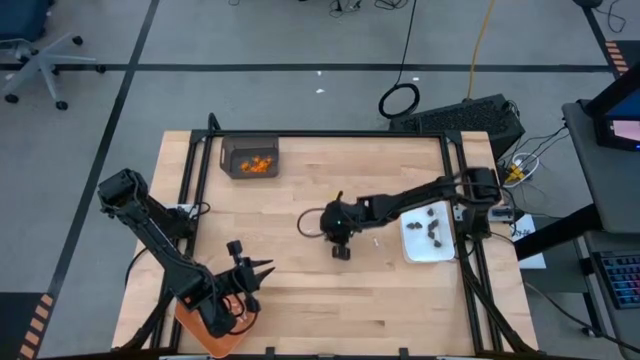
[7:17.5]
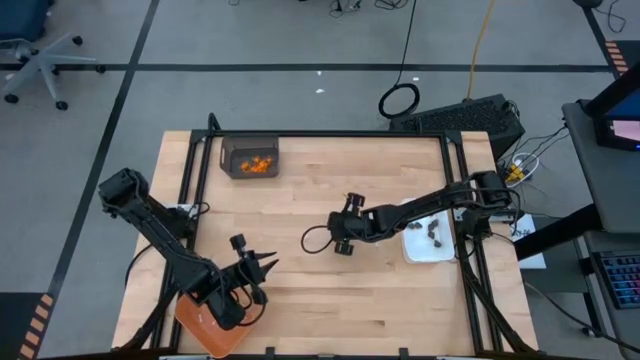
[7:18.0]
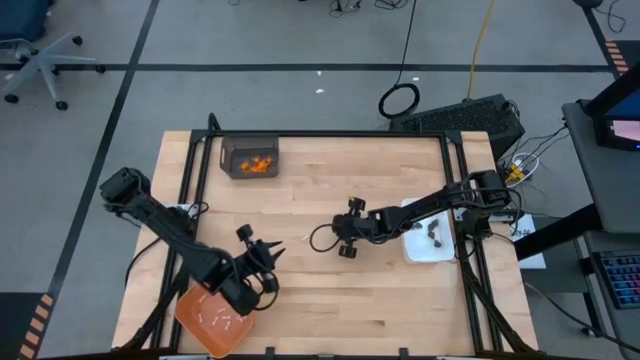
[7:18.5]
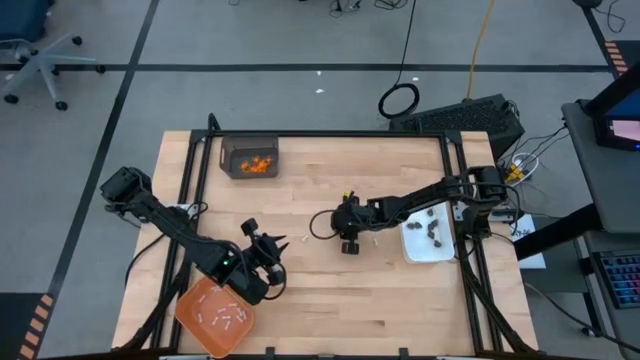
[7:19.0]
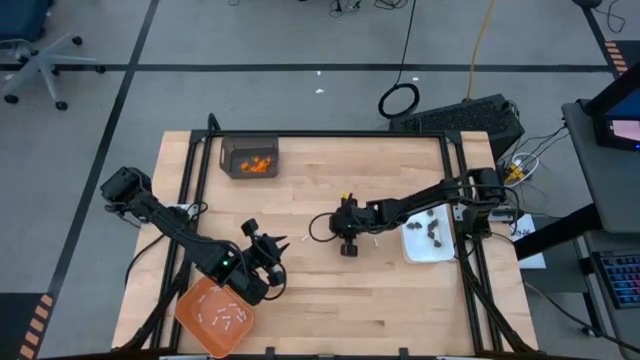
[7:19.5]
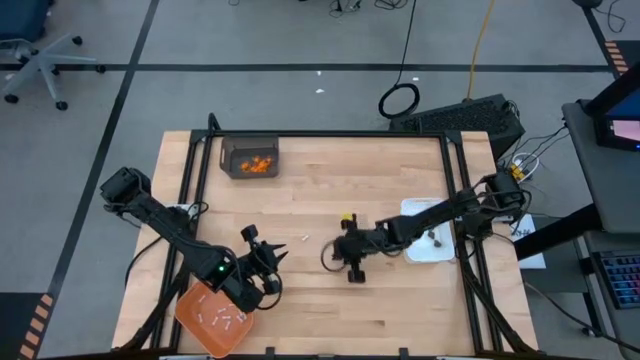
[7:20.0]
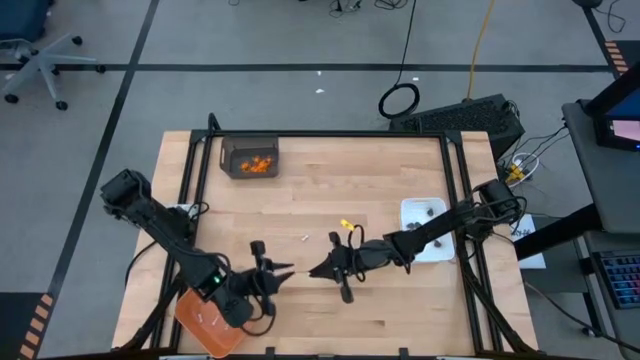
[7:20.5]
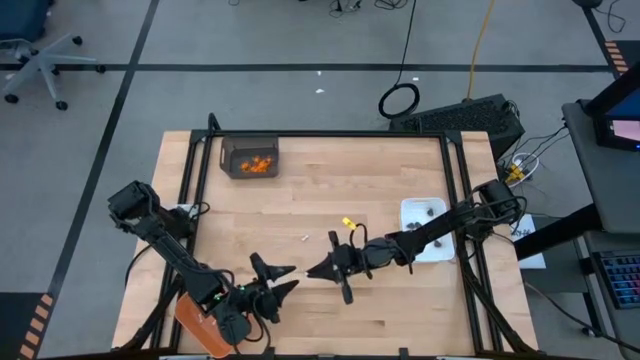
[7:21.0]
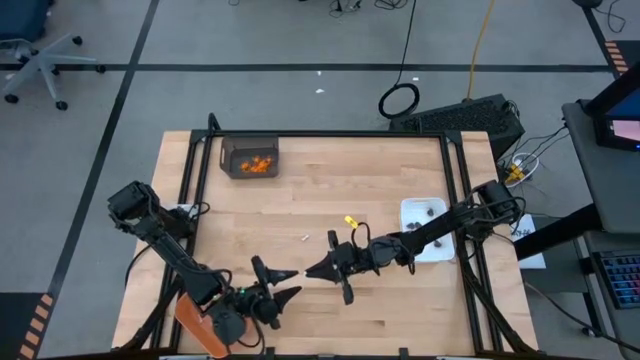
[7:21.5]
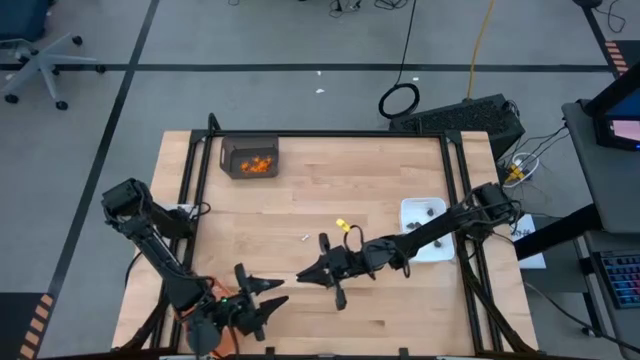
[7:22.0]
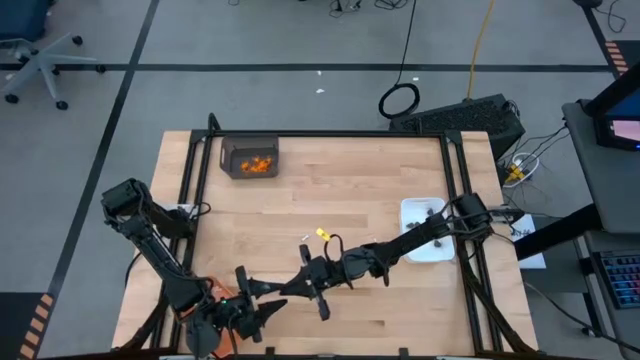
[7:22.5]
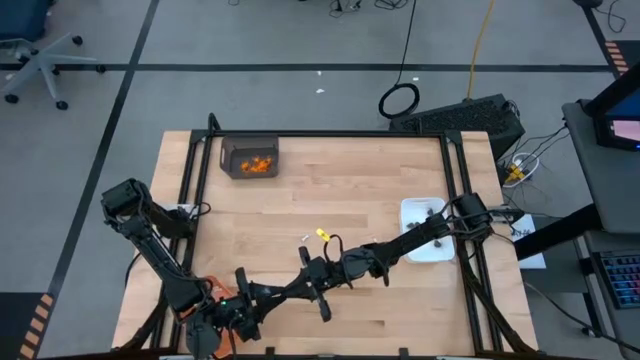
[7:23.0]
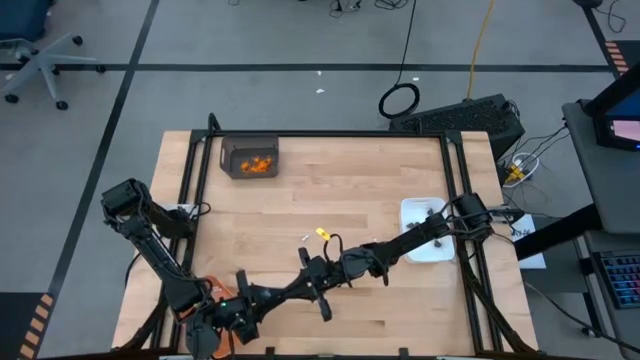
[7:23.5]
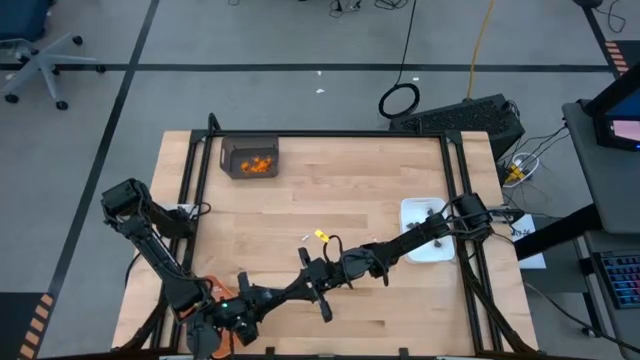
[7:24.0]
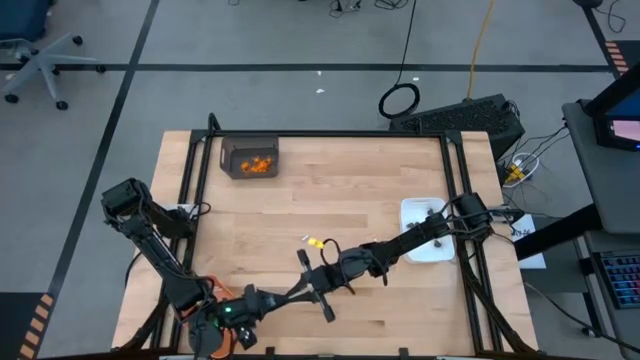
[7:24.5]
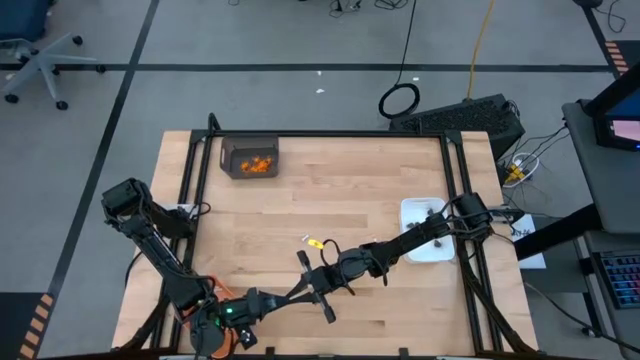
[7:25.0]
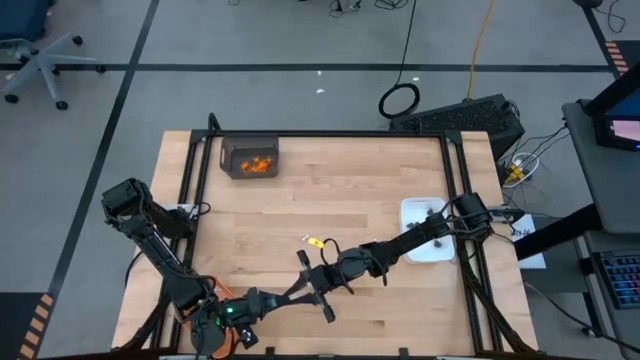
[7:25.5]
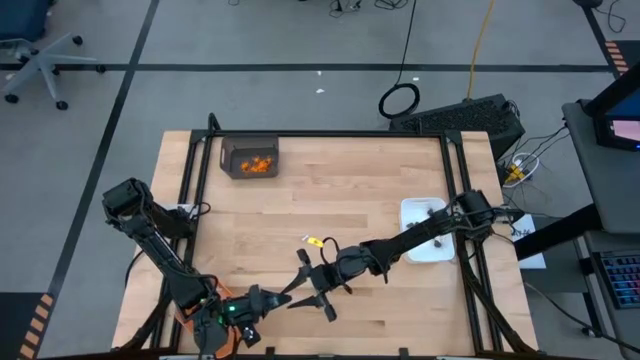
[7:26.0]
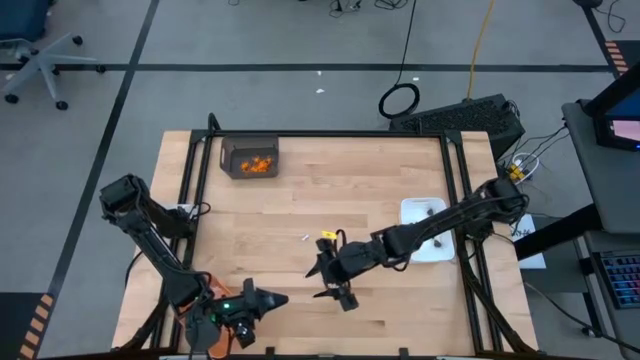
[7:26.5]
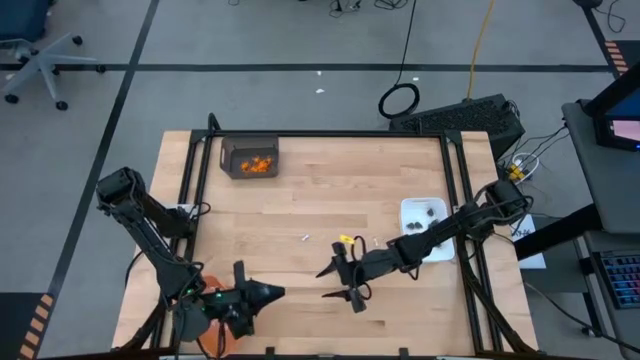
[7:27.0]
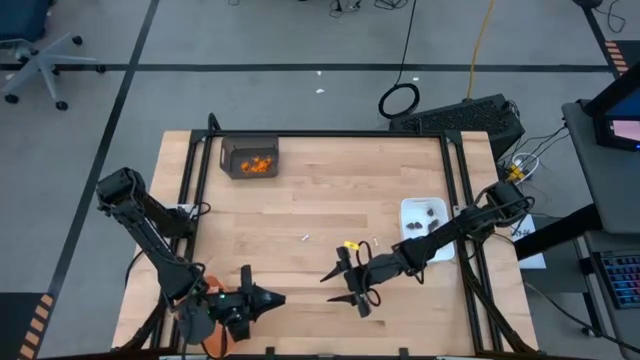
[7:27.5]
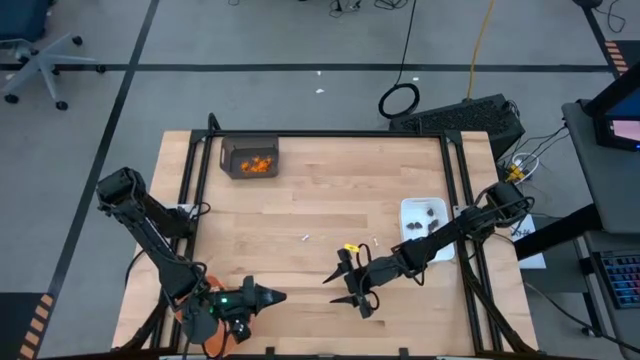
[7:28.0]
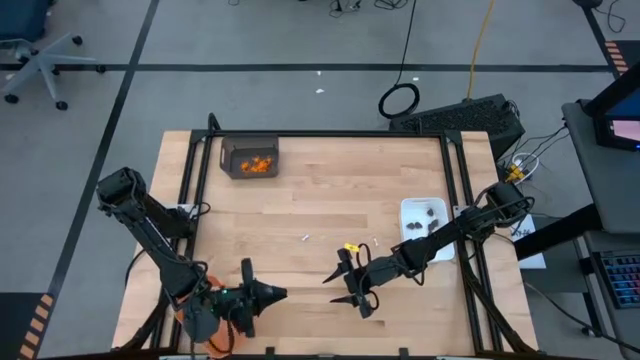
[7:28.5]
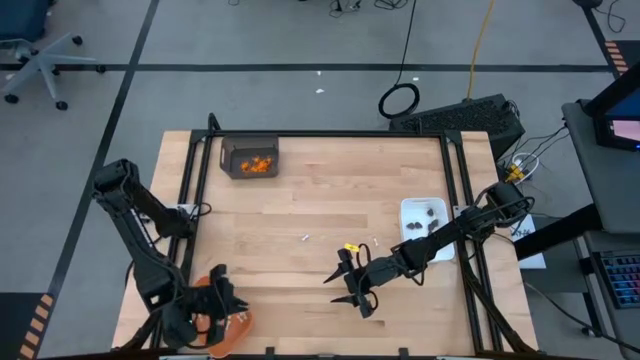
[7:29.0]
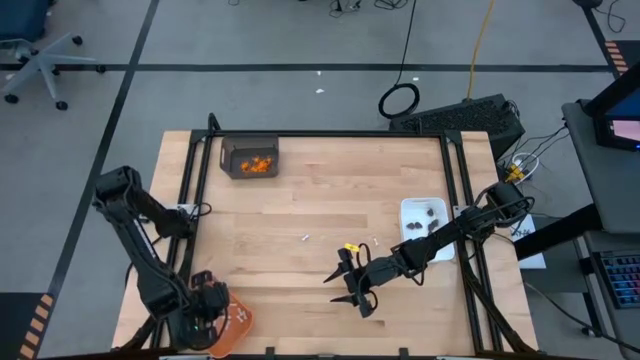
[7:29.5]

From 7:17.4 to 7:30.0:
Task: Sort Halloween decoration
Put the white bone toy into the orange bin

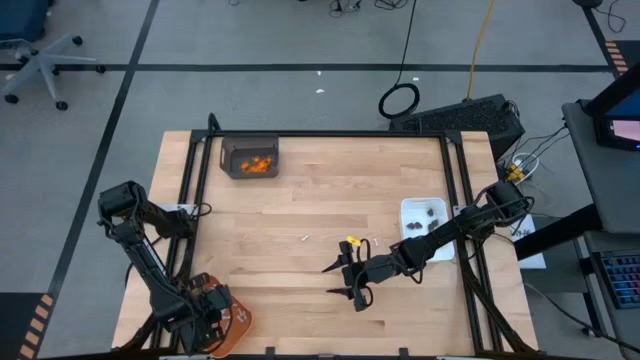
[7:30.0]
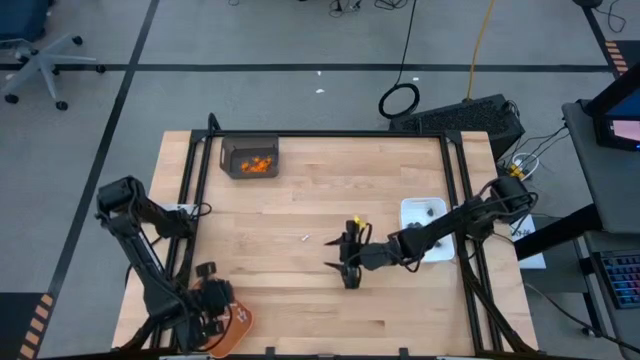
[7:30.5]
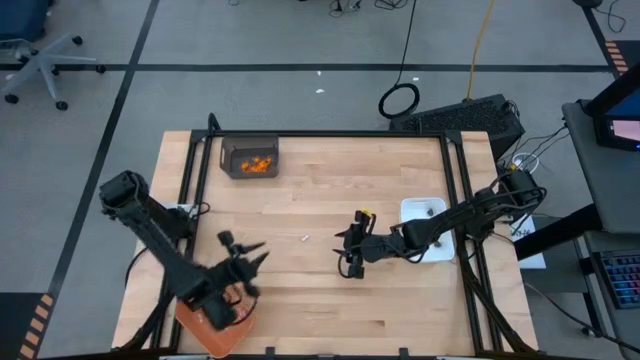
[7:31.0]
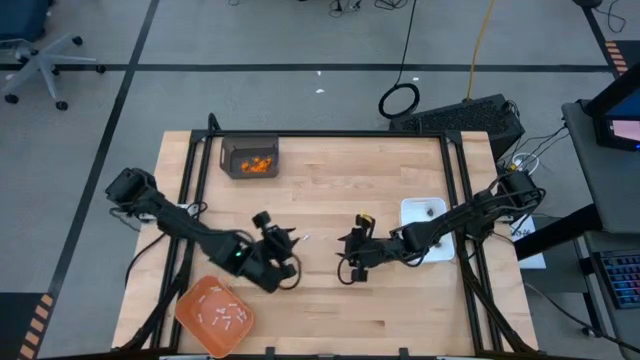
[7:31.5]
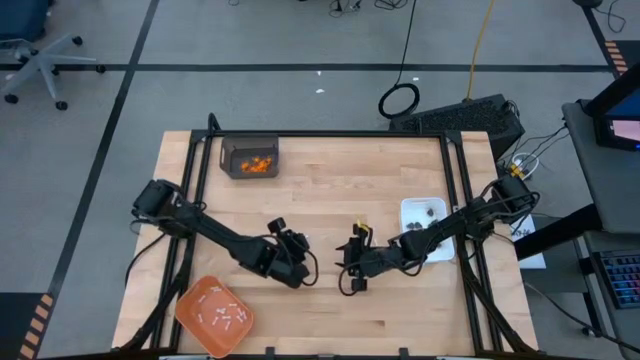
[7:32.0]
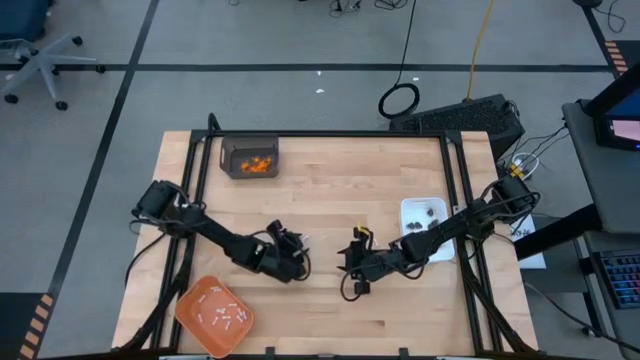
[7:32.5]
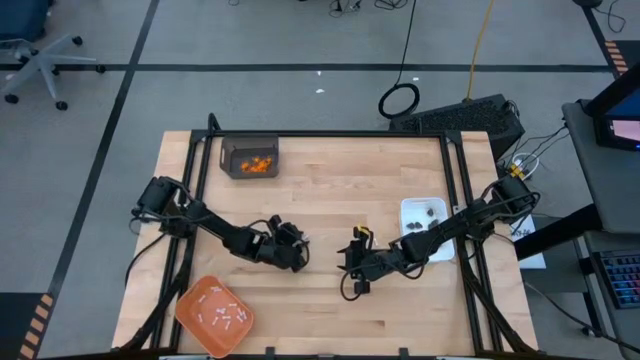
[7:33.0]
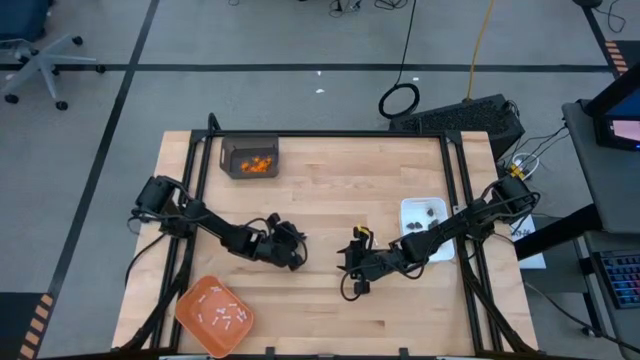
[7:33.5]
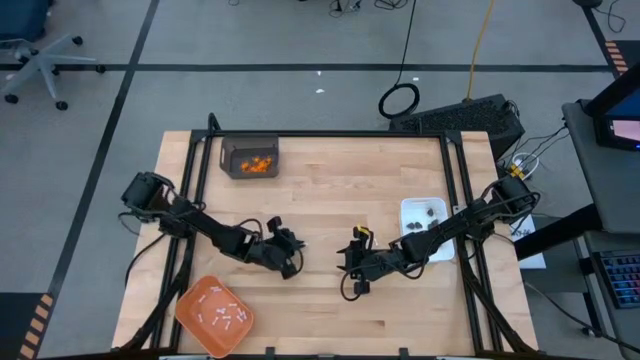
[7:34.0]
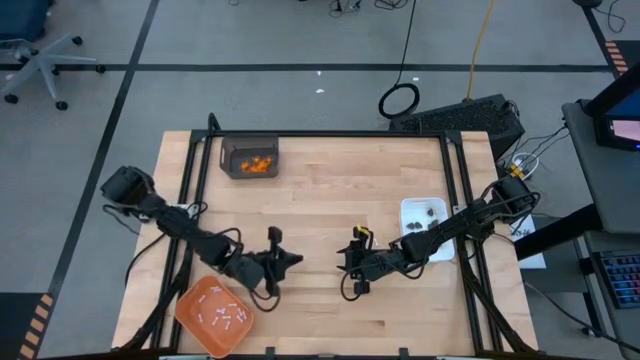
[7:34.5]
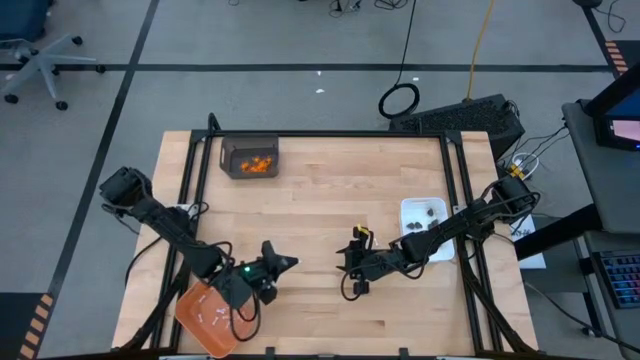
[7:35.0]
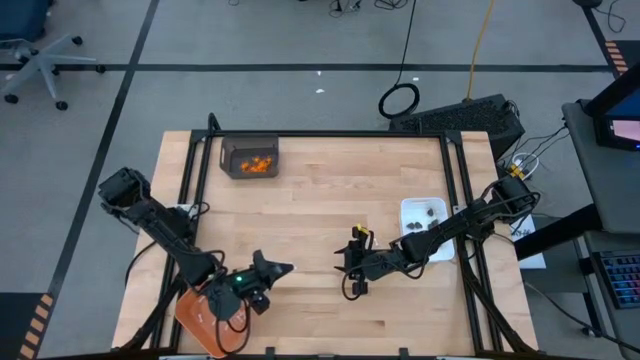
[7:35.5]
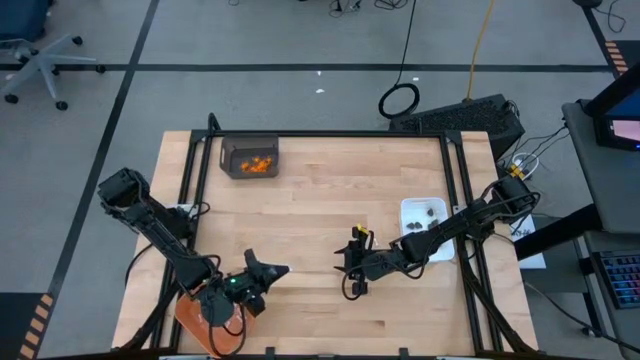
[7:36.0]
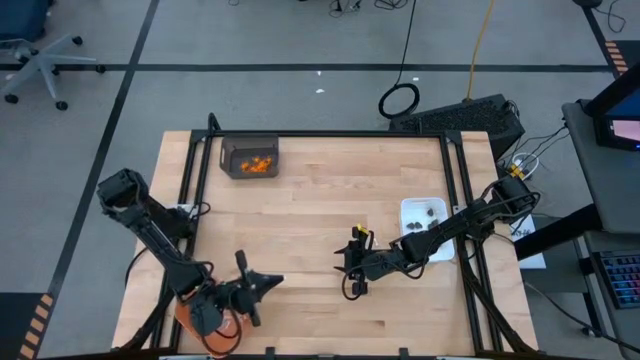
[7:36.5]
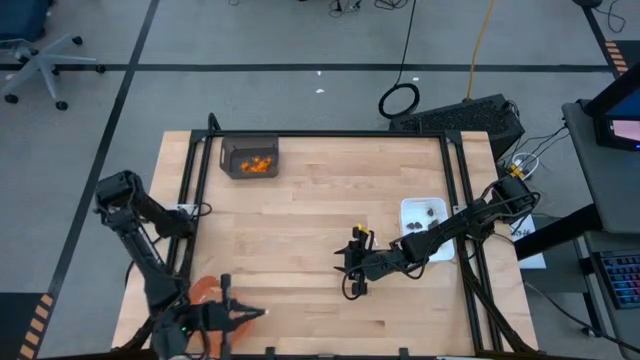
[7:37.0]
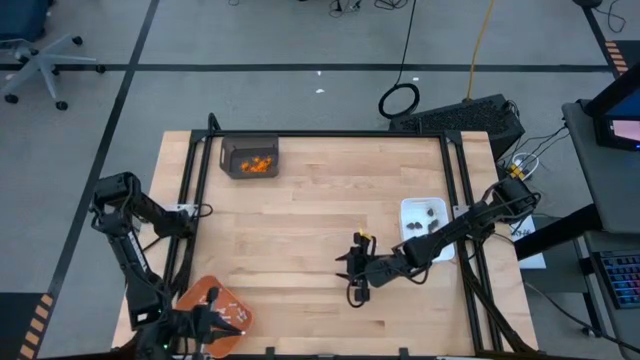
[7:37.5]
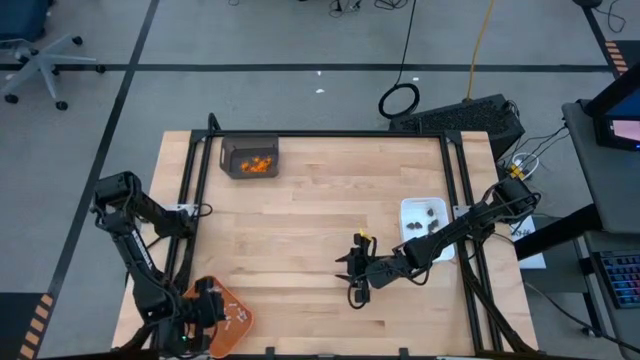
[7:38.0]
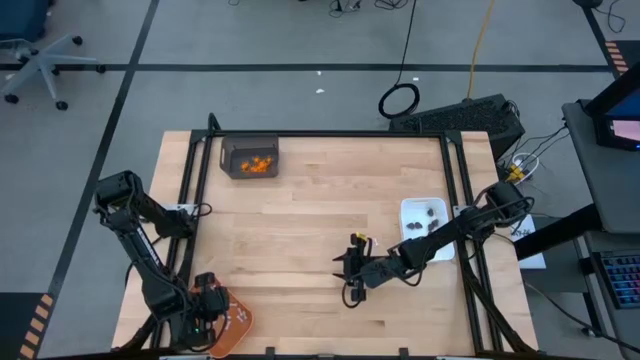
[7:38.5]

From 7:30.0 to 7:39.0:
Put the white bone toy into the orange bin
